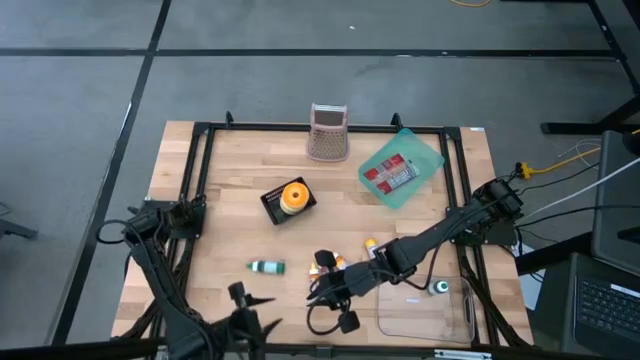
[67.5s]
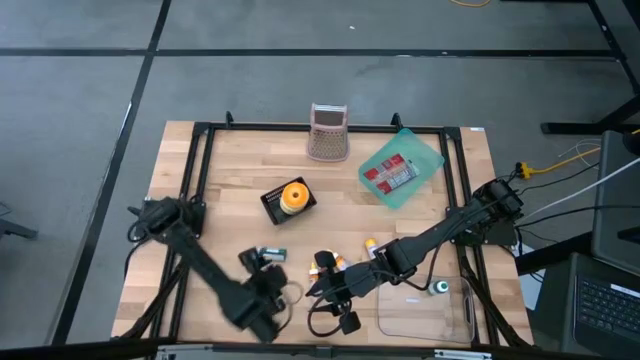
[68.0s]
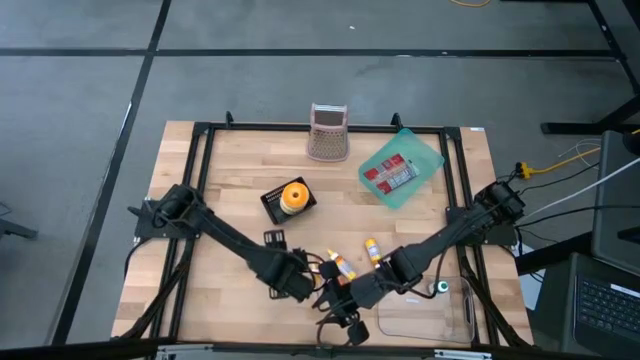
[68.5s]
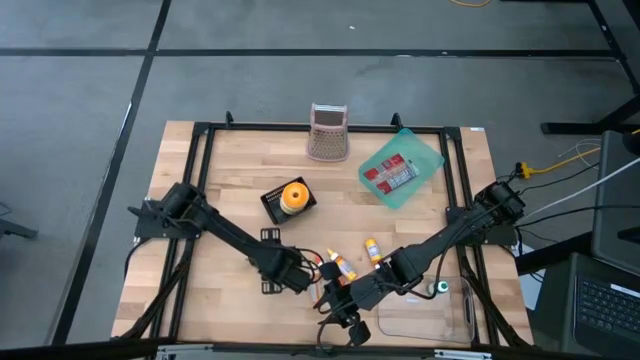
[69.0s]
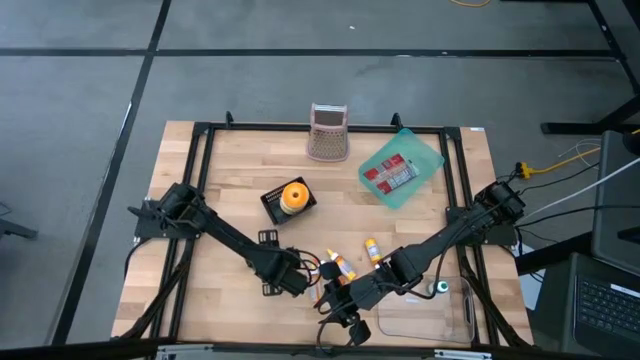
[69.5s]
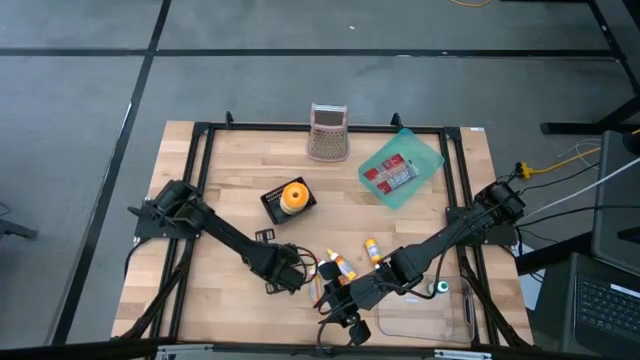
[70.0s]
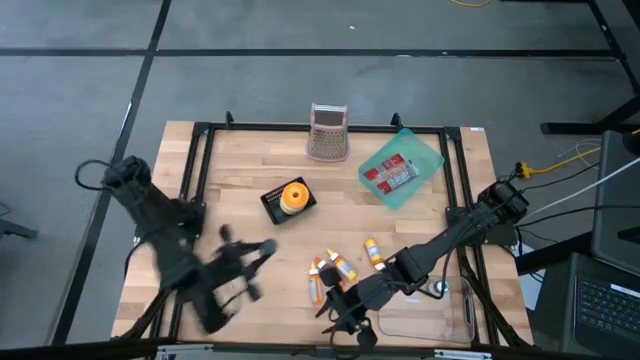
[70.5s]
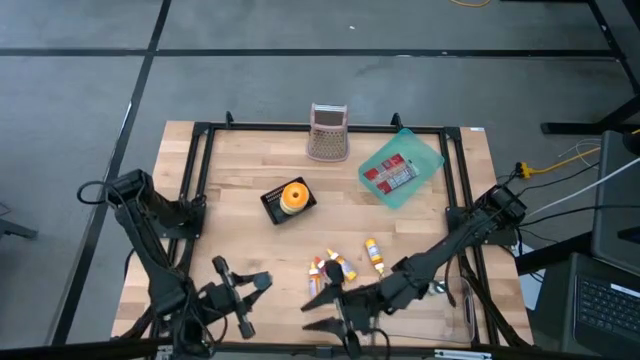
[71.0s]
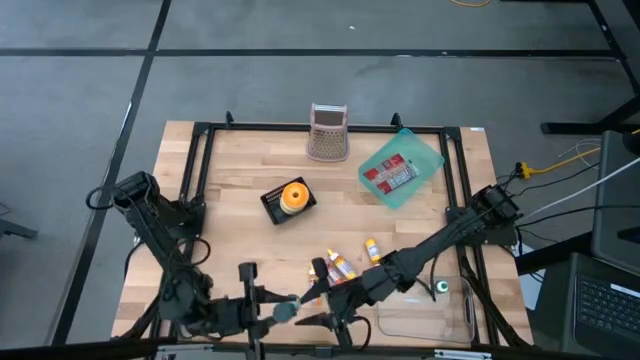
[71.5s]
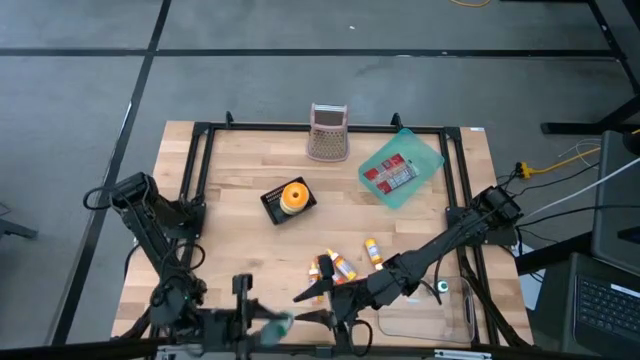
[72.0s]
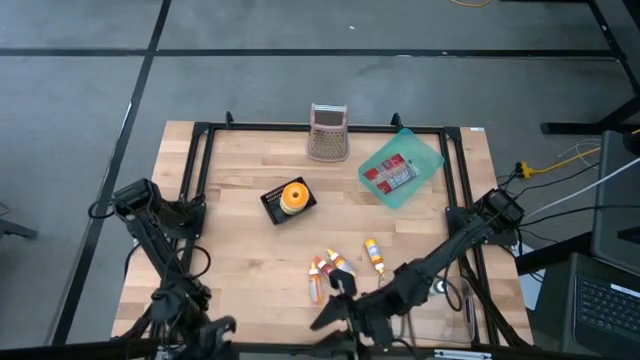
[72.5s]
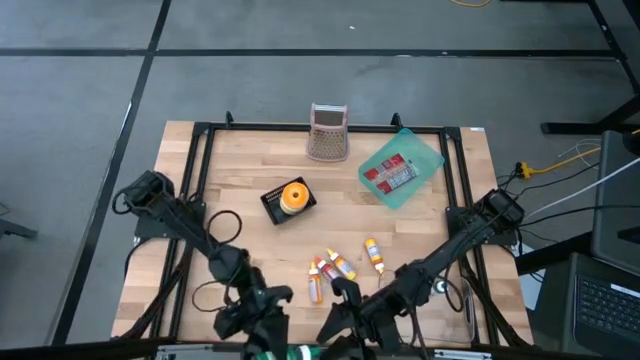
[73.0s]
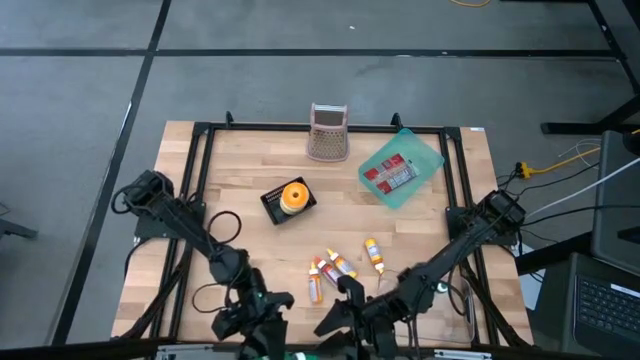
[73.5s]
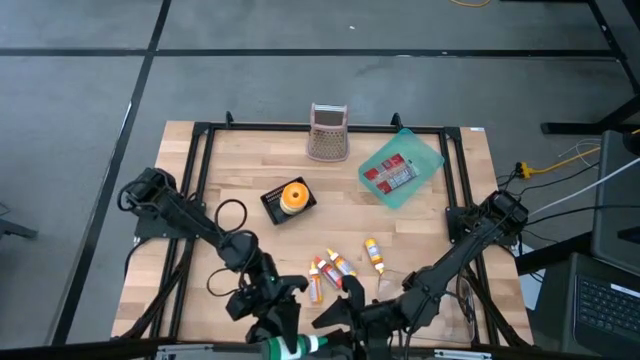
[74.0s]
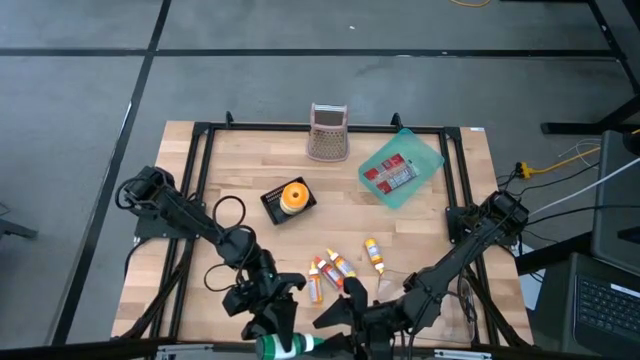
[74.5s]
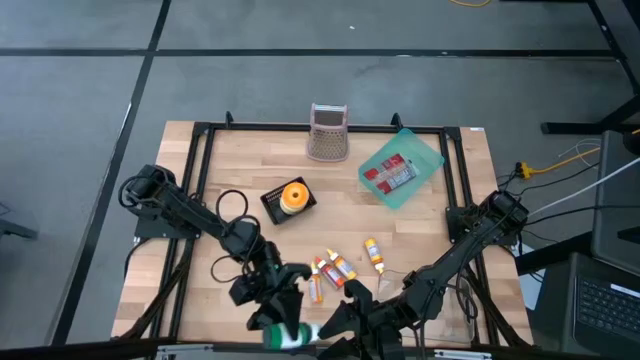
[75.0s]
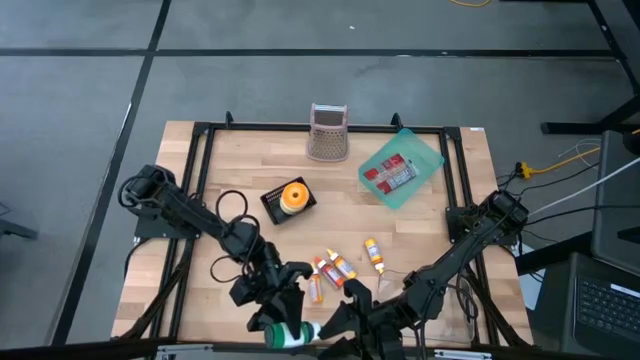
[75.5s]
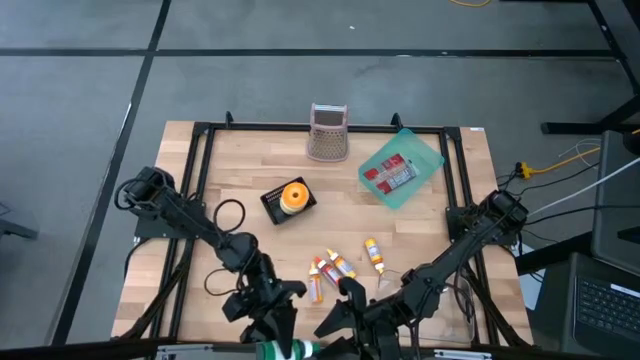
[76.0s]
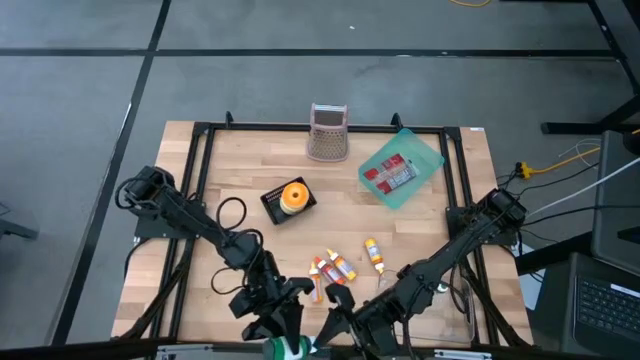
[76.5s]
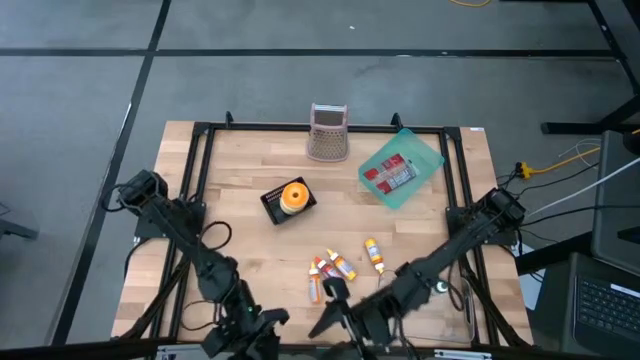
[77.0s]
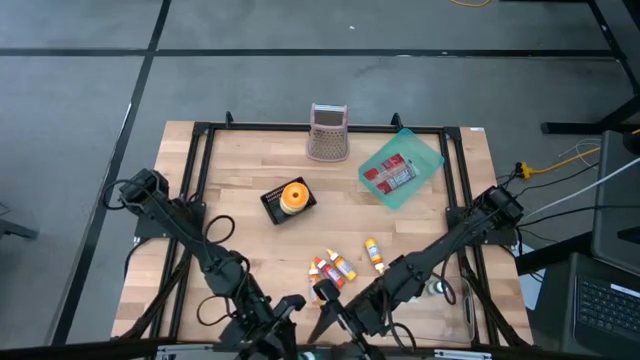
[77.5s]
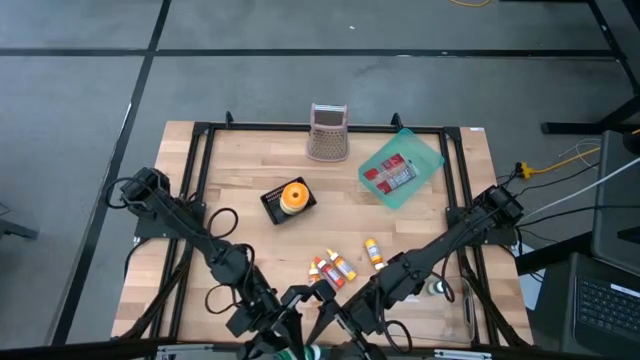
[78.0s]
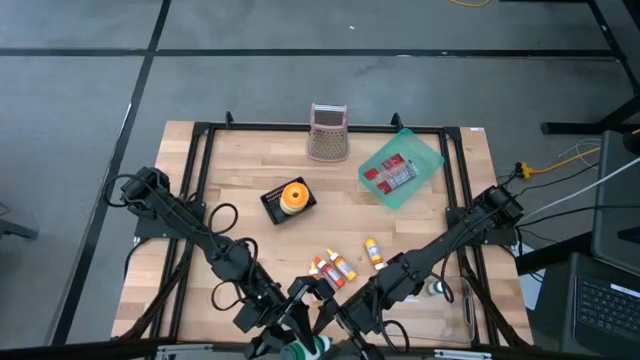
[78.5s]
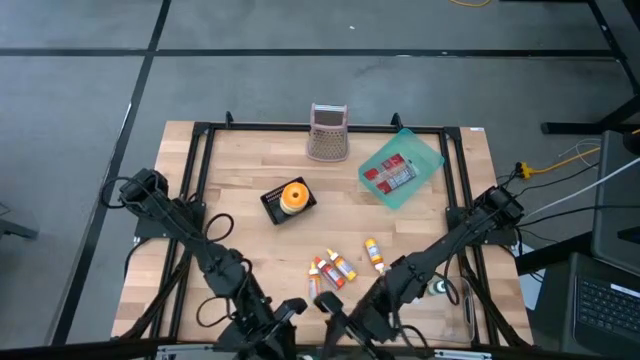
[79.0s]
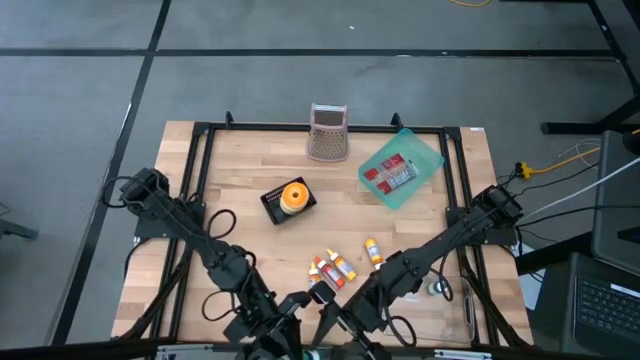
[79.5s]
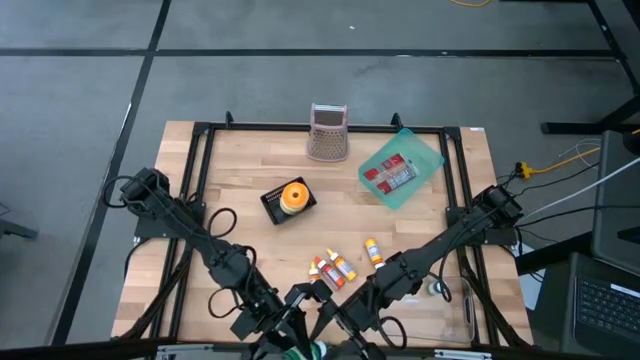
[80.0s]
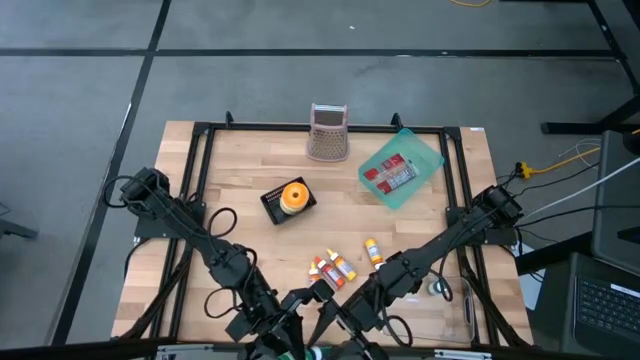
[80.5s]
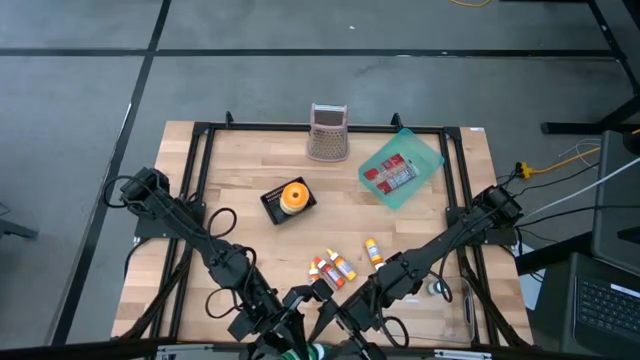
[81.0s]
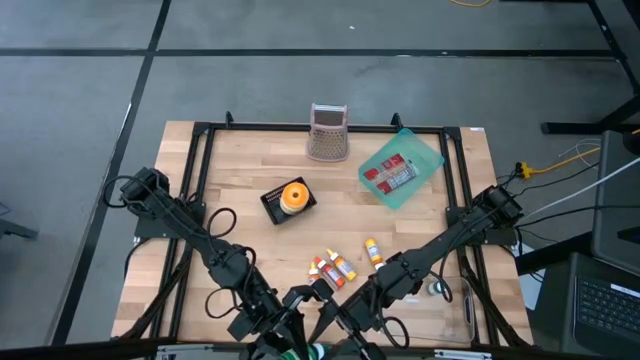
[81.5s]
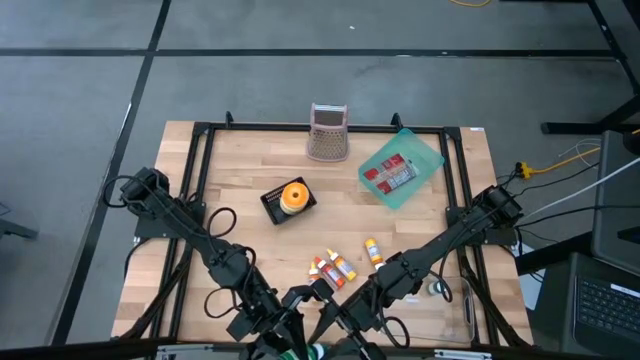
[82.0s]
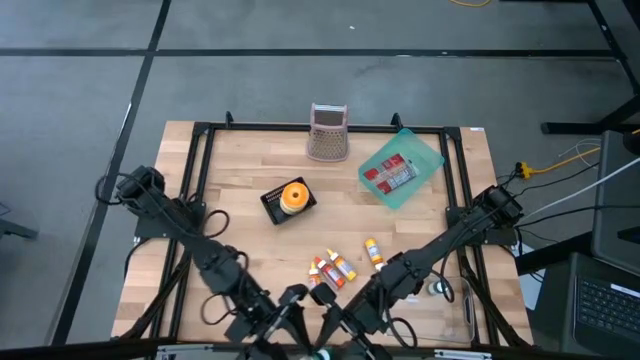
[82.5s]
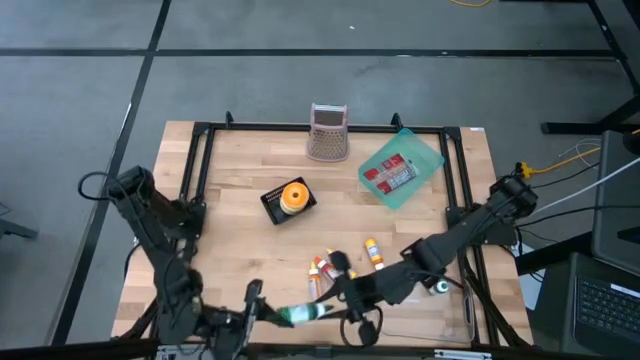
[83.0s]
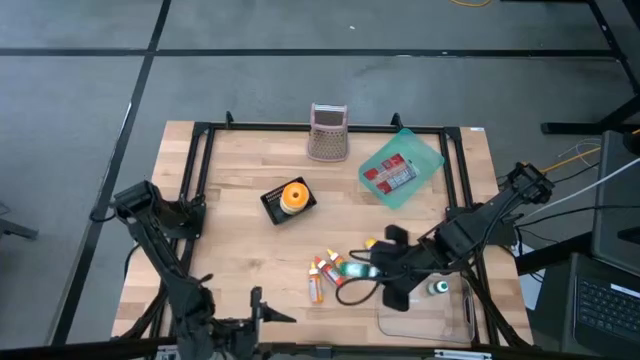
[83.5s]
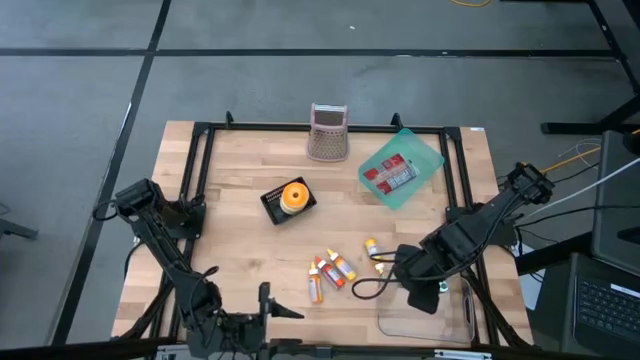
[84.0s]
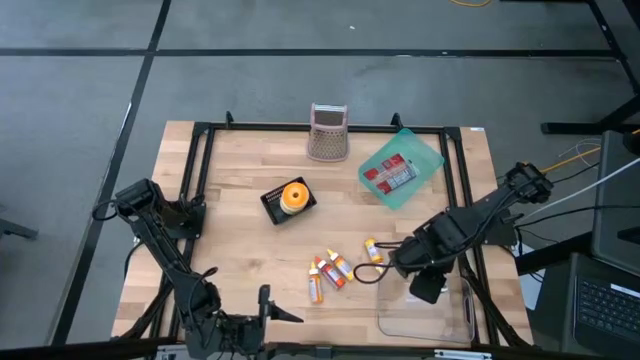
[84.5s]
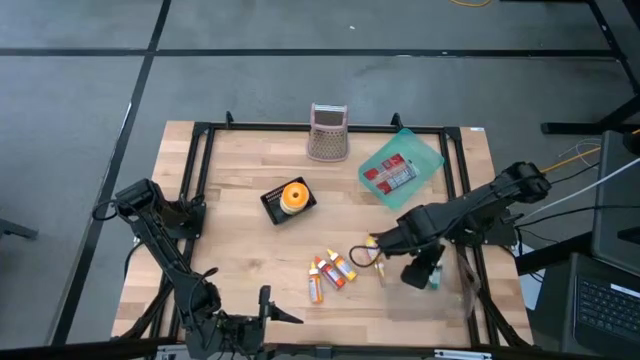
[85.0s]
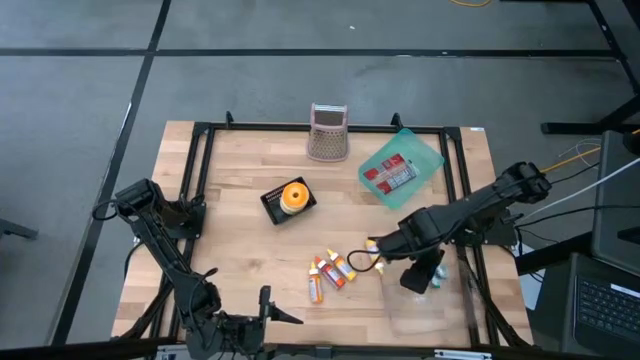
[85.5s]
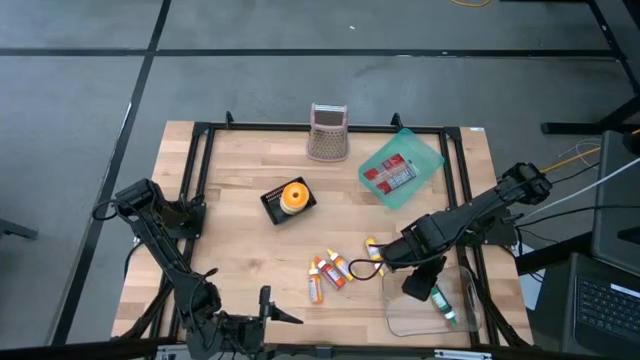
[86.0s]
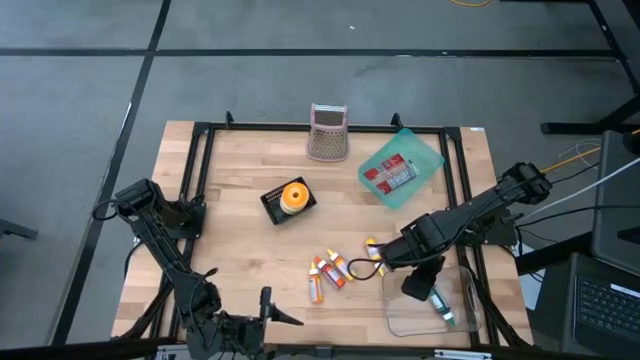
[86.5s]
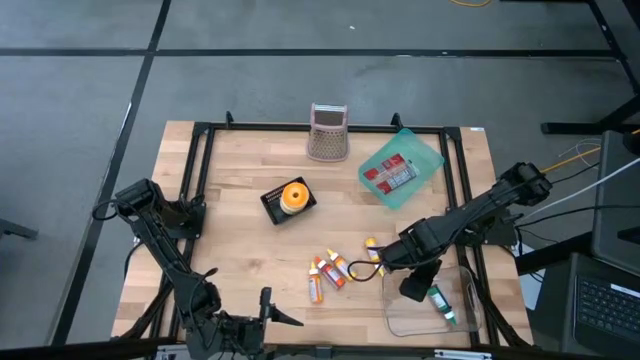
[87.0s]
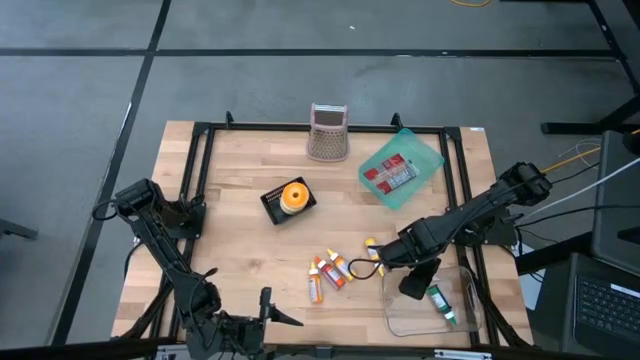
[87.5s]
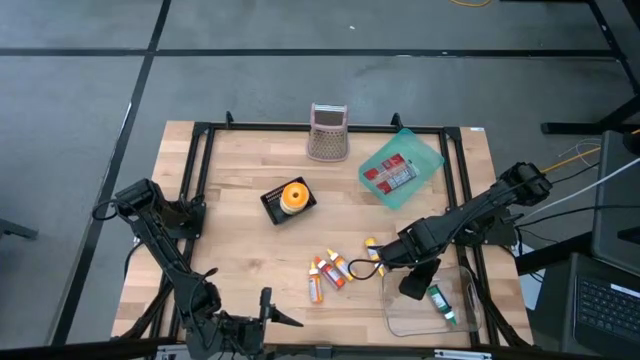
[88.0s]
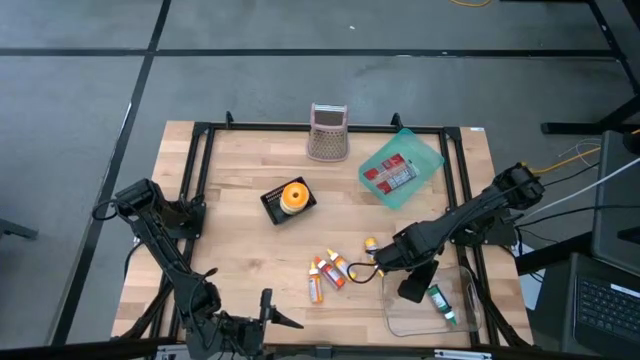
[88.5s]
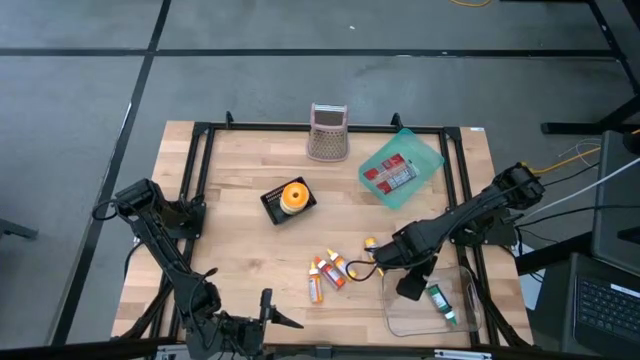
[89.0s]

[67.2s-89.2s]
Task: Pick & Place Food Item
Put the green food coloring bottle into the transparent bin
